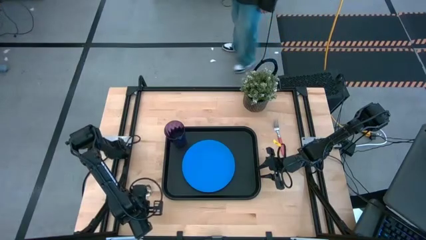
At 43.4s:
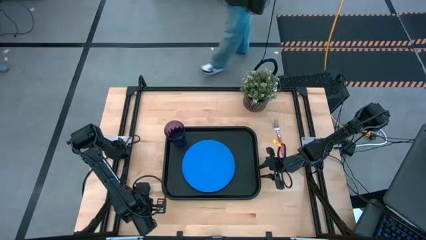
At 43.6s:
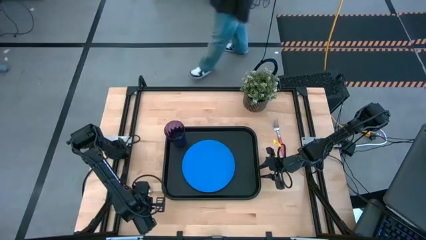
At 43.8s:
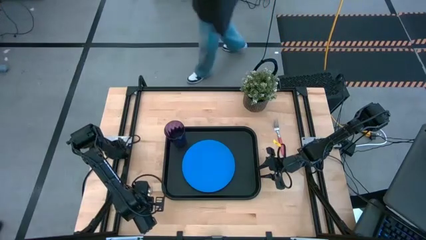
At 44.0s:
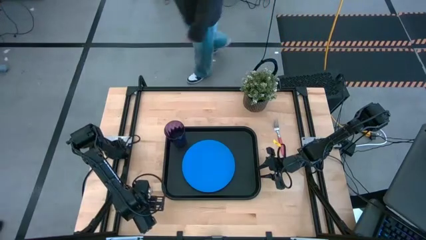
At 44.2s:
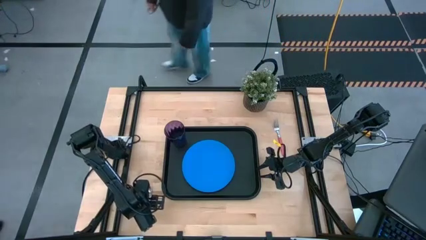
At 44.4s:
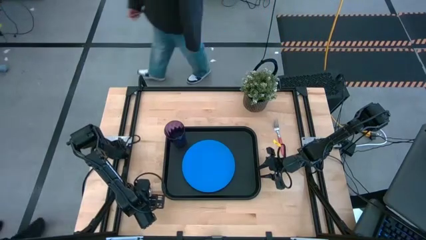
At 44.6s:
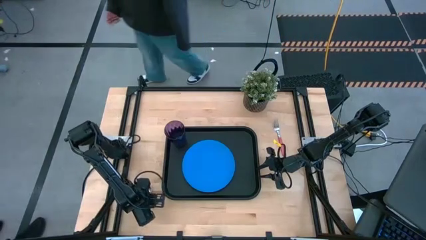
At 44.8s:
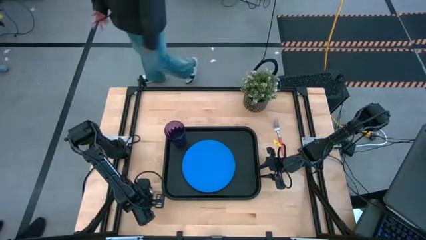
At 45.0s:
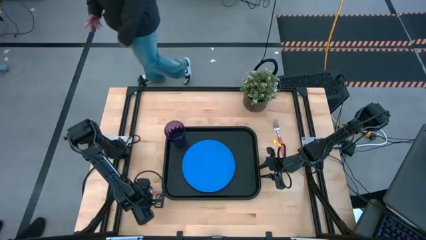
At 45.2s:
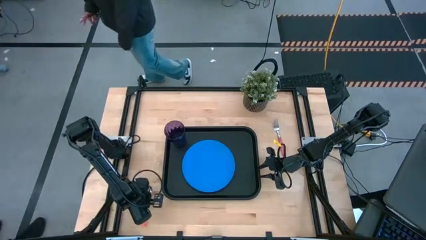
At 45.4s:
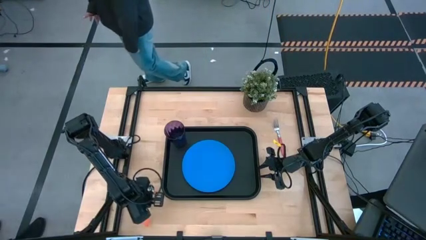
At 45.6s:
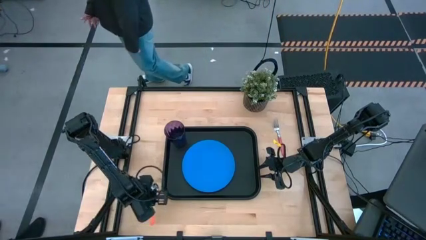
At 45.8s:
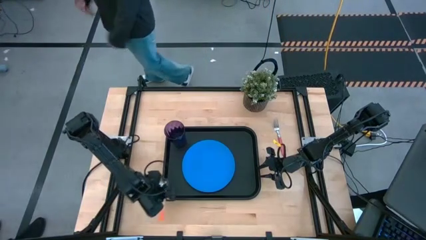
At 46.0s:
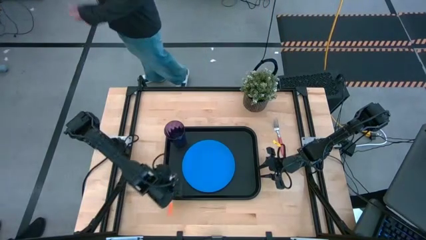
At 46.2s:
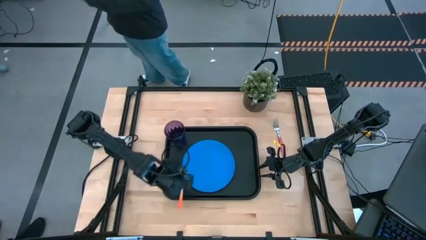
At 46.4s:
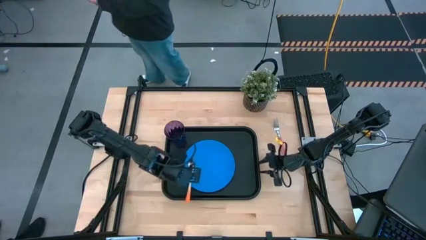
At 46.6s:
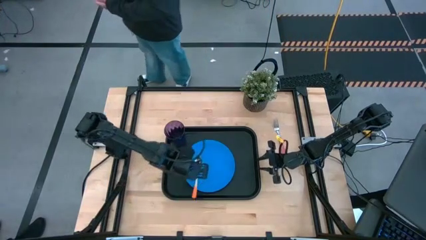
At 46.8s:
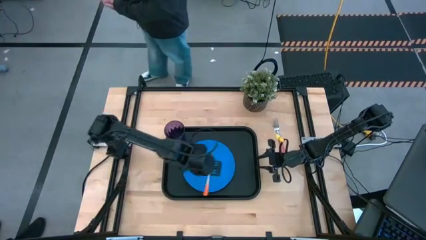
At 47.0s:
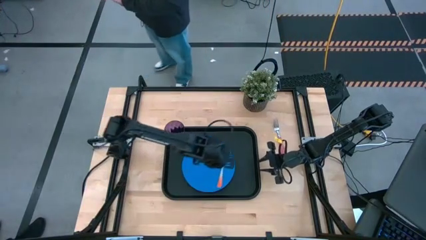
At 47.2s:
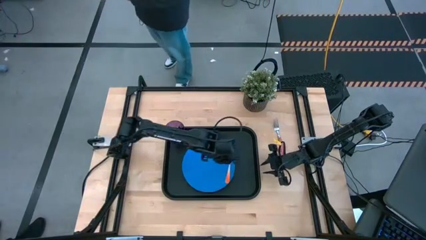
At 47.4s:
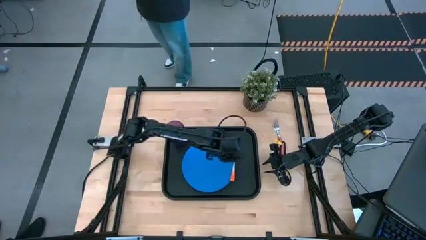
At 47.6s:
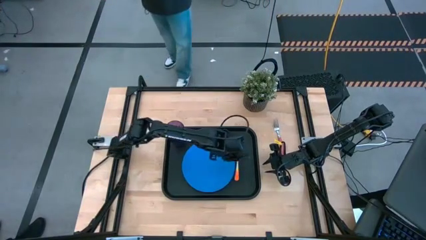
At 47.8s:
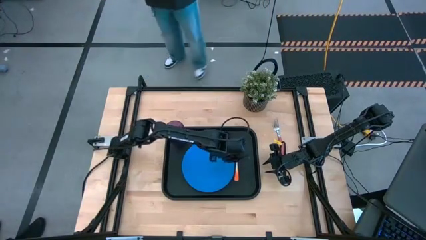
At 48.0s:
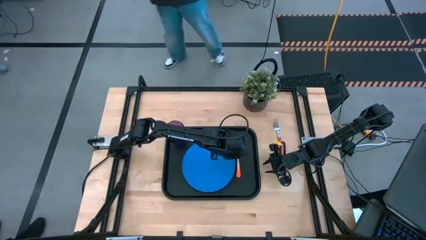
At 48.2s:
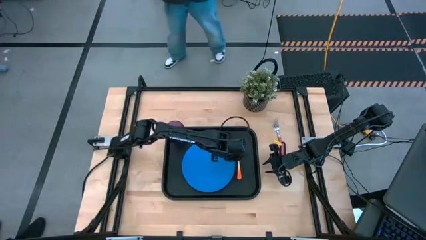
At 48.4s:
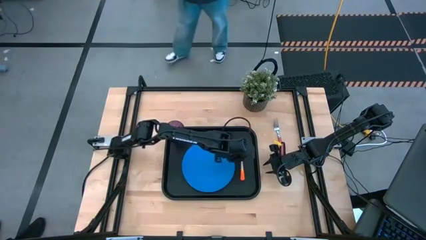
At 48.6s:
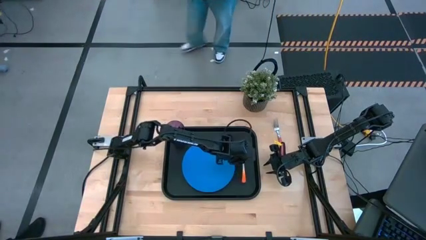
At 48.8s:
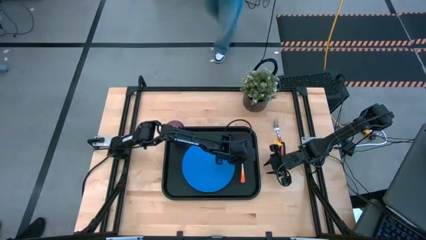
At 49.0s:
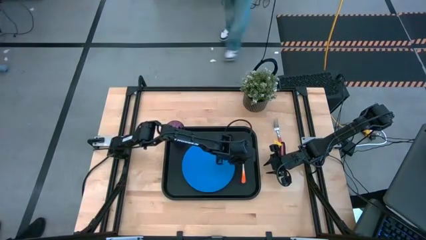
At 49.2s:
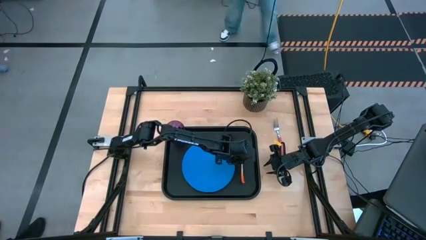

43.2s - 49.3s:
Task: Pick and place plate/cup/fork/spoon on tray
Put the orange spoon on the black serving tray to the right side of the blue plate

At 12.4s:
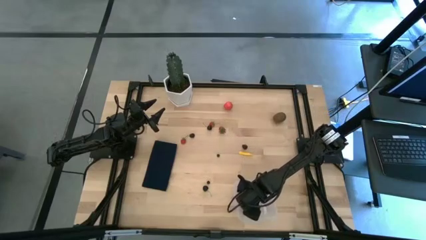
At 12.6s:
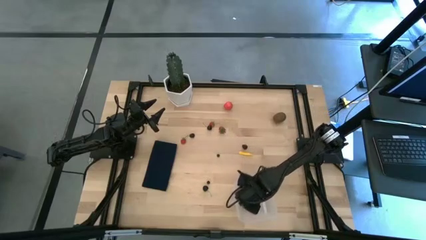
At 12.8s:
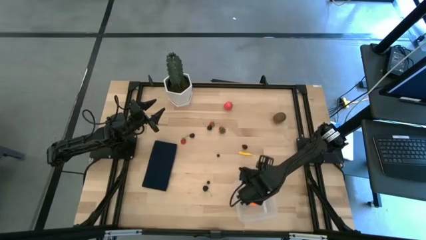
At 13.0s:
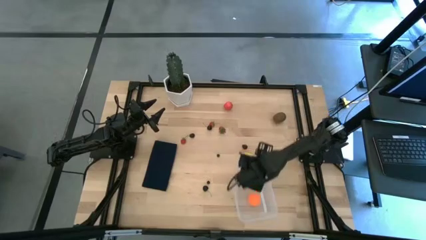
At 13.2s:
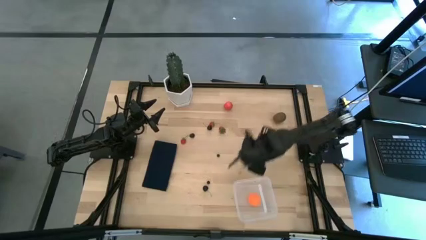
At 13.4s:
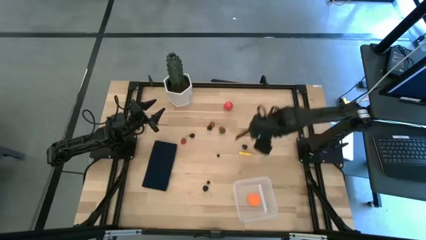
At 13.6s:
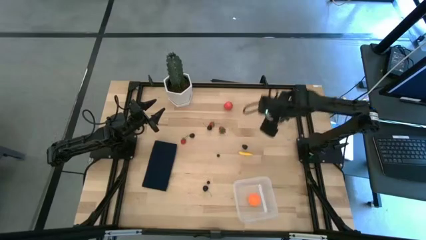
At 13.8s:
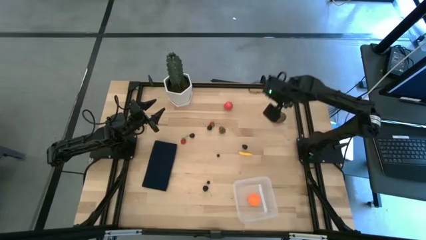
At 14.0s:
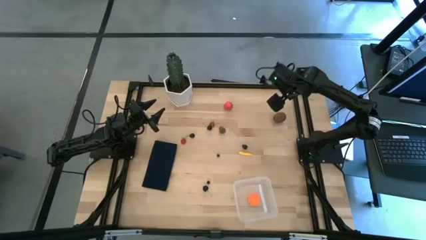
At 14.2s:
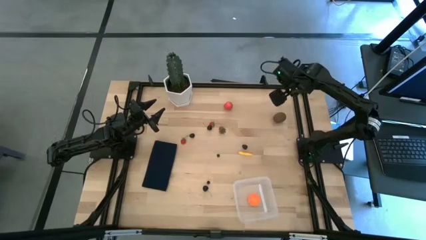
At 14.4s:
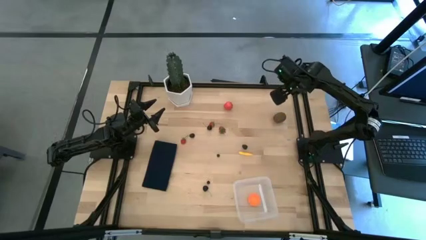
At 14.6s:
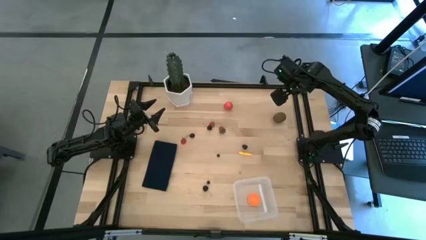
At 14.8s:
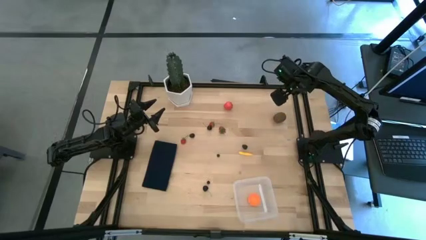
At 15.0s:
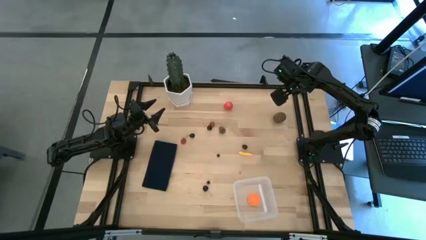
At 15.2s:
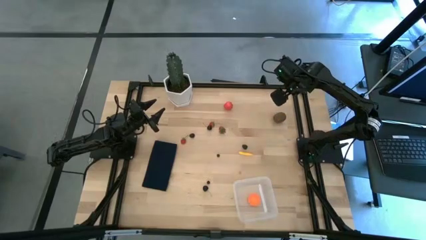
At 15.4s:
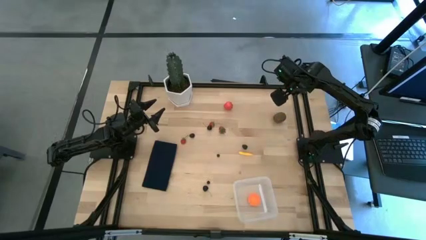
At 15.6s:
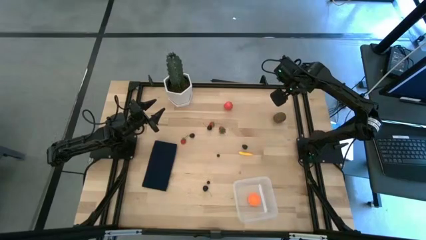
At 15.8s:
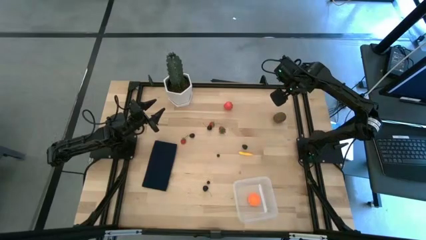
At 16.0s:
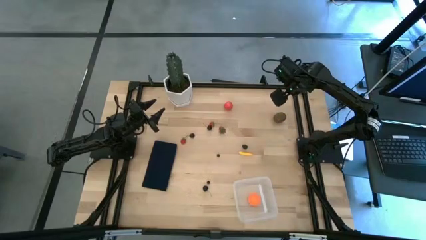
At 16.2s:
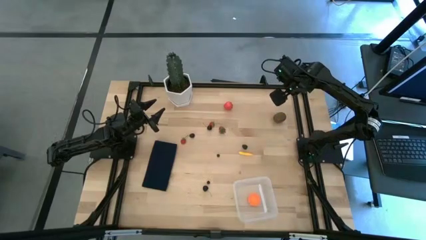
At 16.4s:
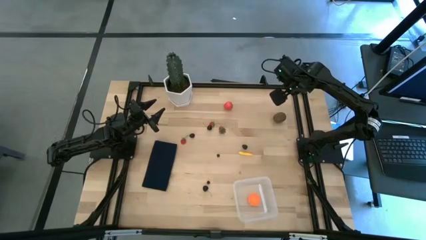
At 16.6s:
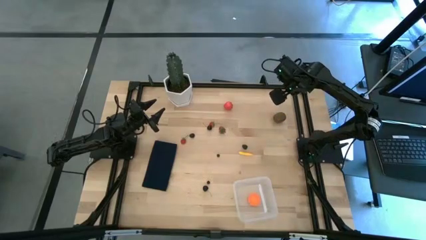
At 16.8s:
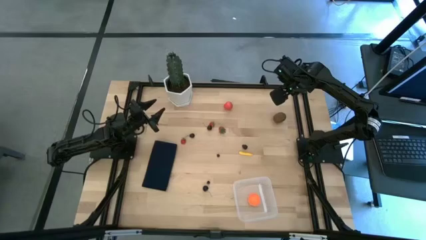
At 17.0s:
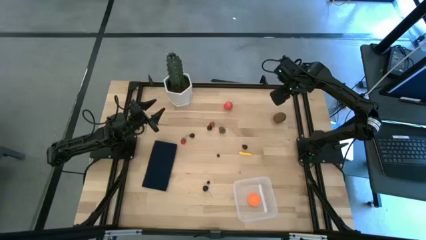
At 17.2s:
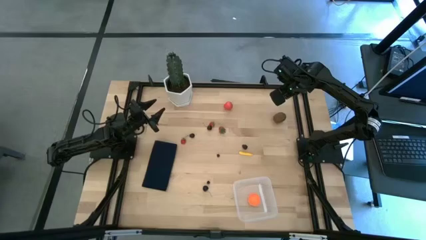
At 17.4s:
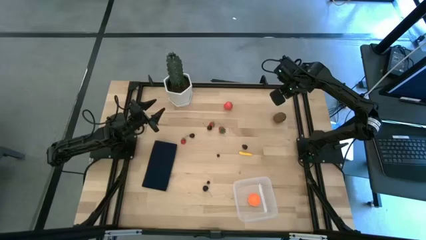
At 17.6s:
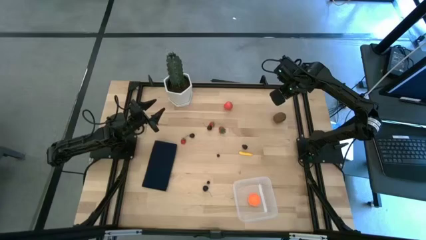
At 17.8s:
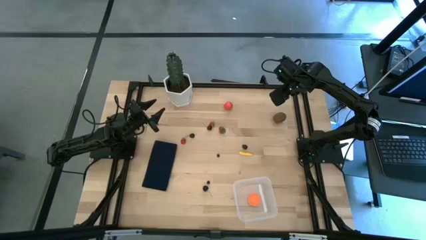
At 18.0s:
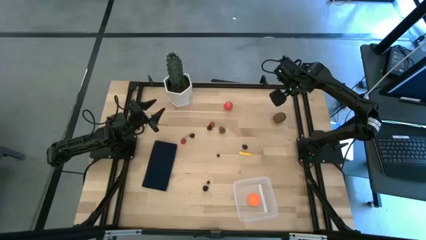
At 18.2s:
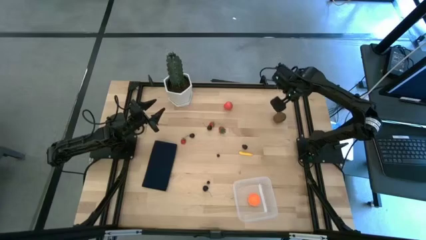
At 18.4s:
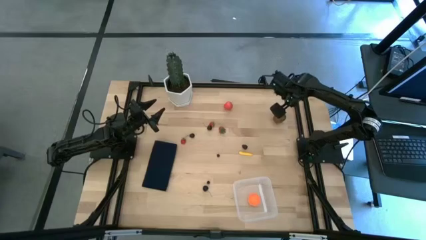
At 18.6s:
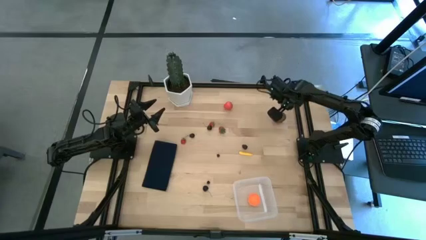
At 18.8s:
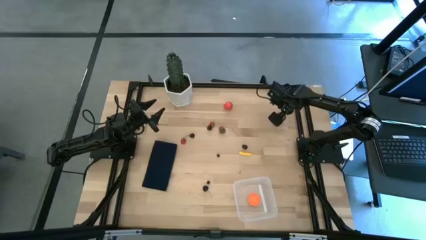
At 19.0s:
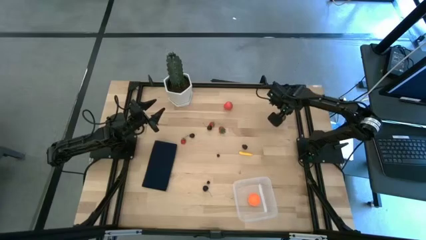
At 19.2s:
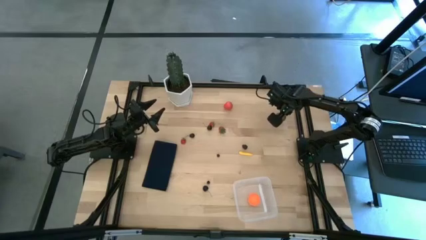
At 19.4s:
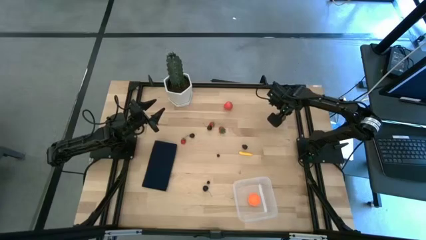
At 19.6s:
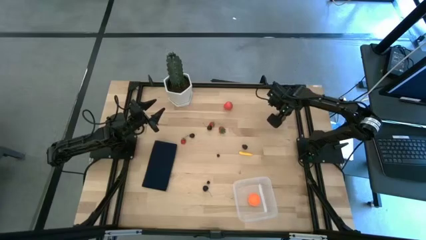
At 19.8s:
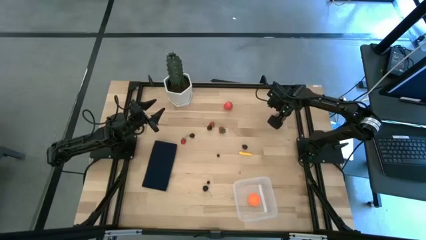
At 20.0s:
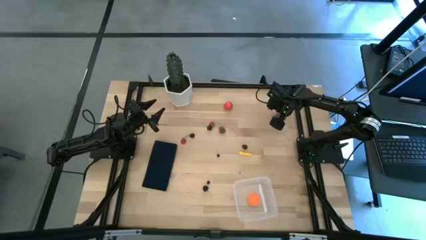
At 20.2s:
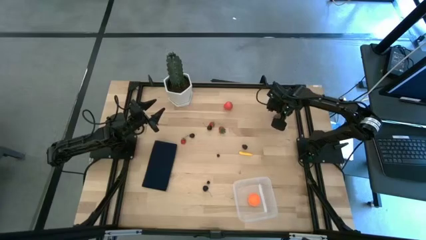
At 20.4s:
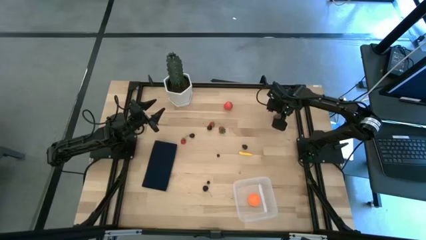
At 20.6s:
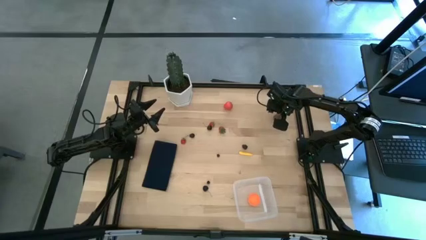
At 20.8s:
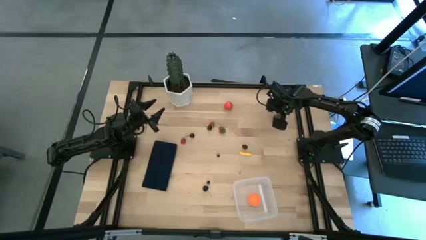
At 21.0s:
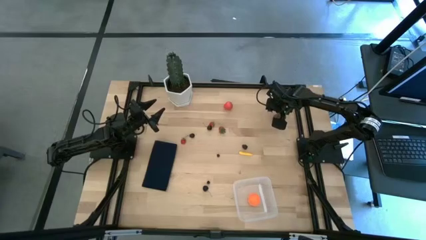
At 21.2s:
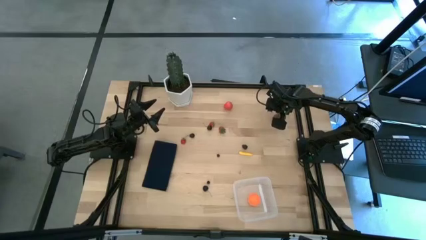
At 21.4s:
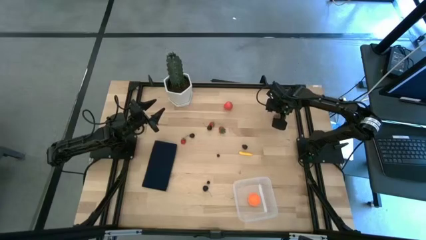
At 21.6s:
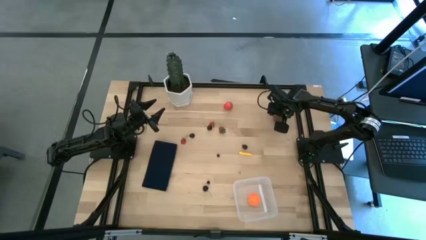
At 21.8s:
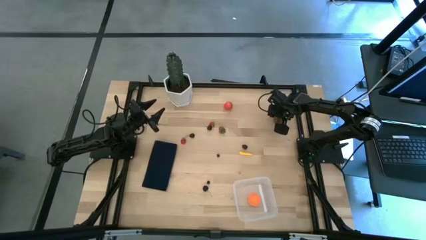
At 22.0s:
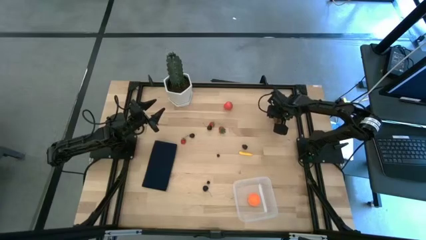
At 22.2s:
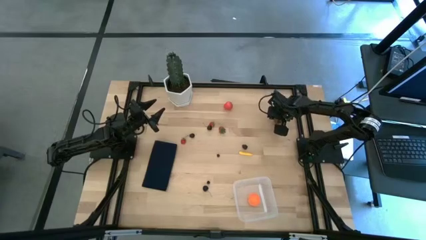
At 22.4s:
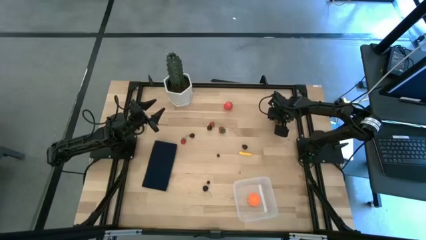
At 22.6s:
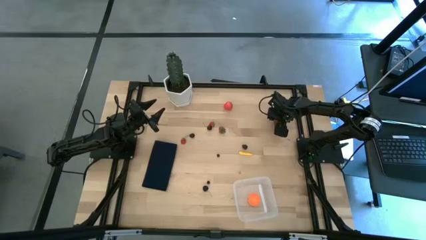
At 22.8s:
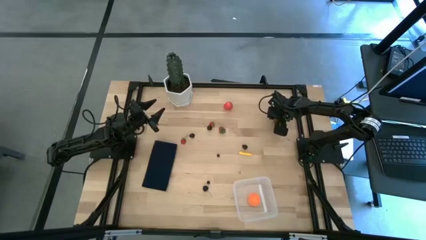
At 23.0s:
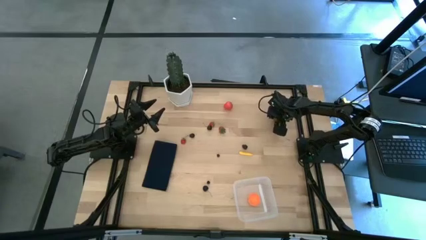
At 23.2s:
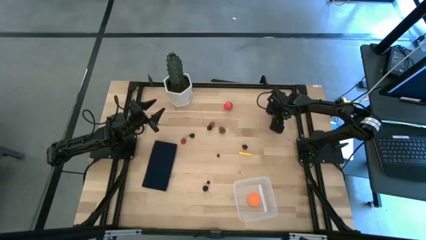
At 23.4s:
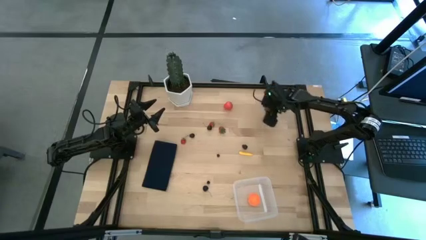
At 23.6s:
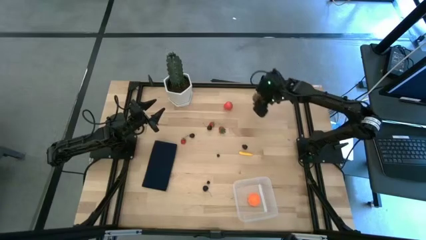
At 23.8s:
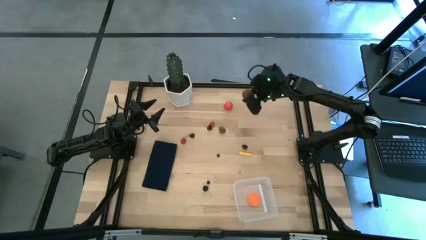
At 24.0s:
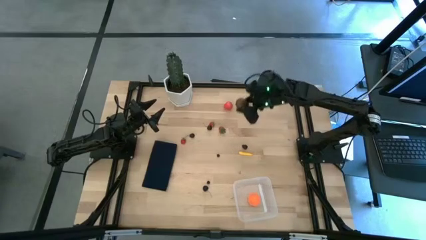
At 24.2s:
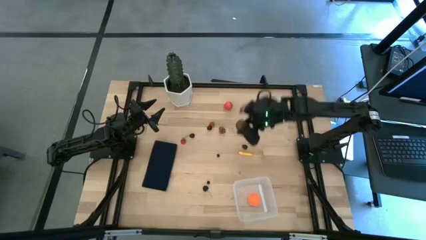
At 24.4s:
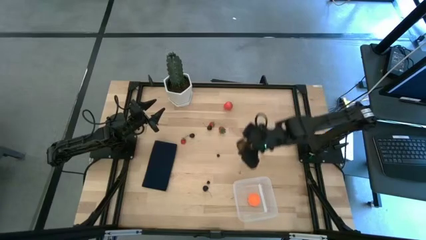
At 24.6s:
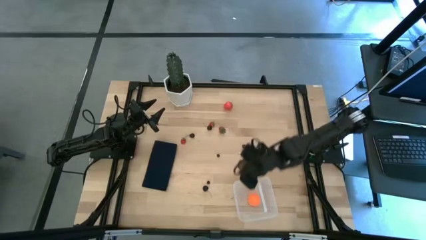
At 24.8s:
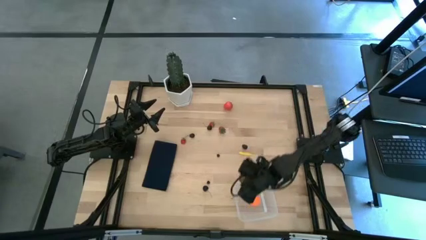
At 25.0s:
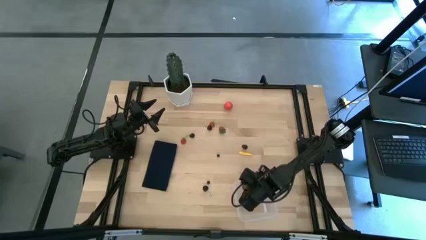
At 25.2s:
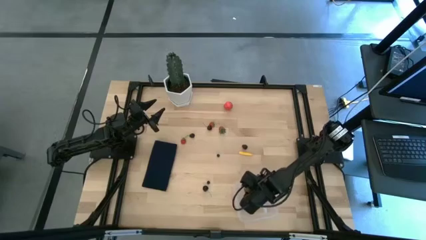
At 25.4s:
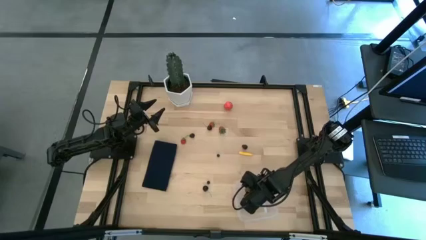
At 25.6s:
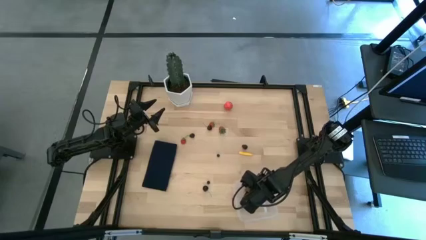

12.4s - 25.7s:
Task: Pick and placing Produce into tupperware
Put the kiwi into the transparent bin
